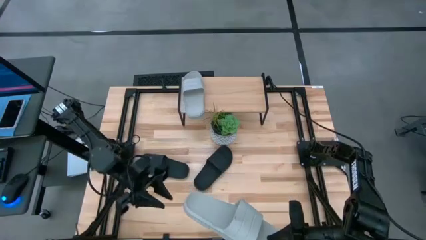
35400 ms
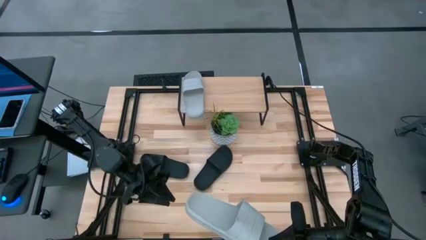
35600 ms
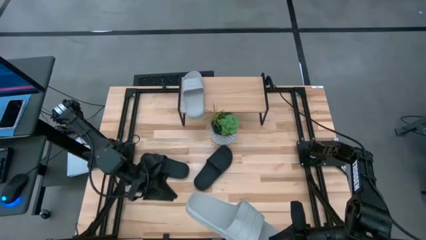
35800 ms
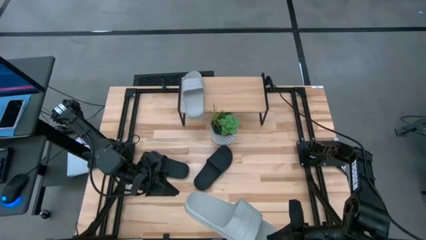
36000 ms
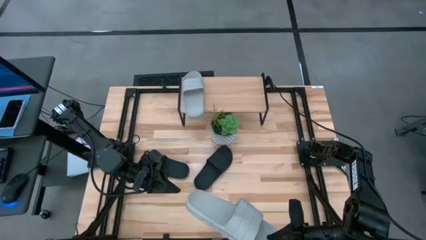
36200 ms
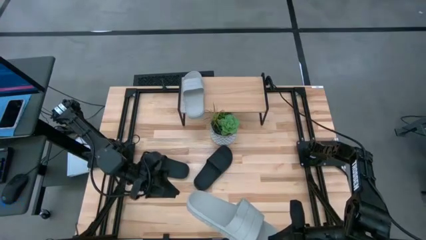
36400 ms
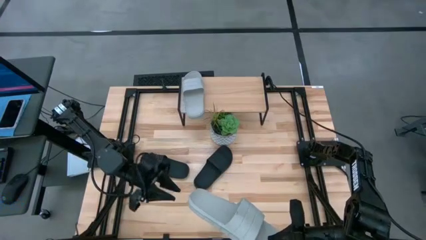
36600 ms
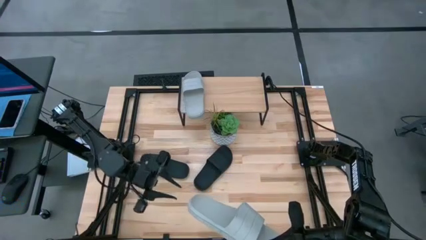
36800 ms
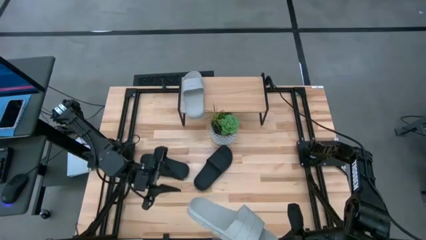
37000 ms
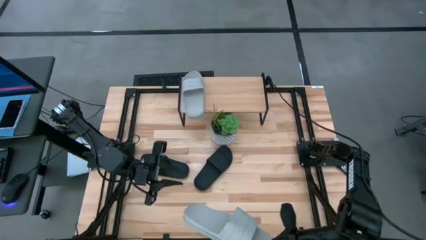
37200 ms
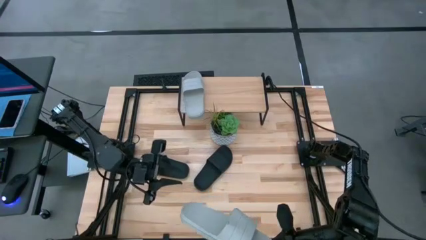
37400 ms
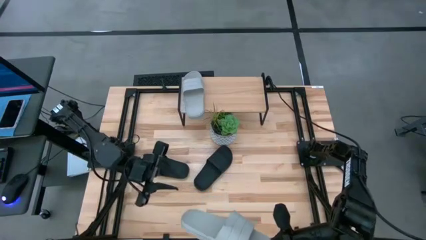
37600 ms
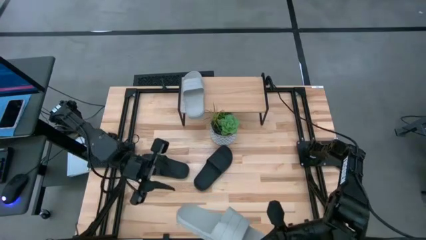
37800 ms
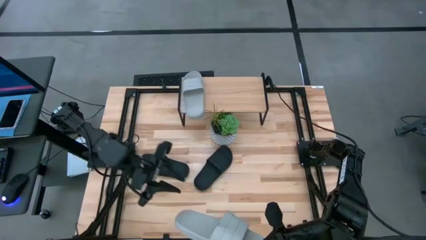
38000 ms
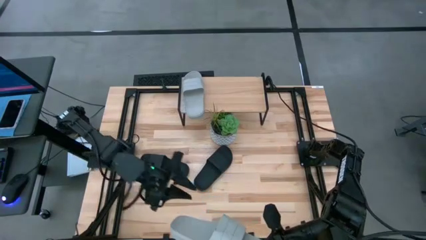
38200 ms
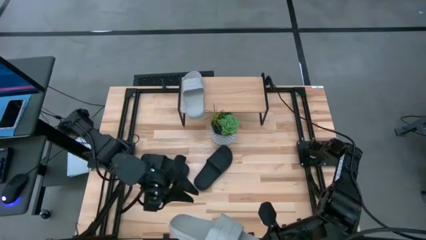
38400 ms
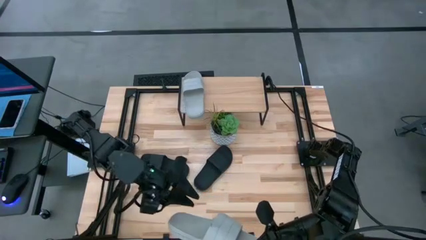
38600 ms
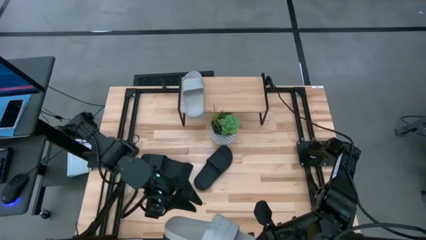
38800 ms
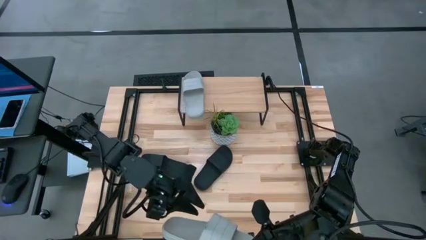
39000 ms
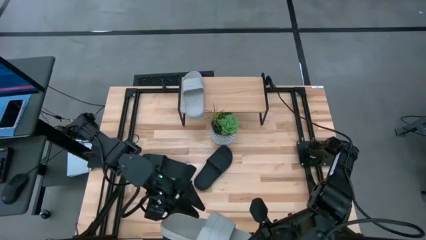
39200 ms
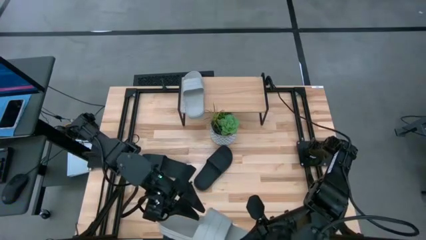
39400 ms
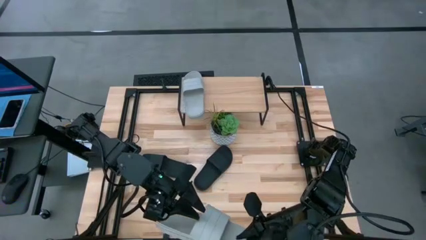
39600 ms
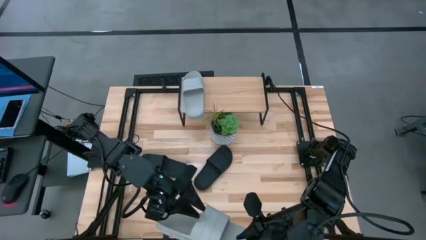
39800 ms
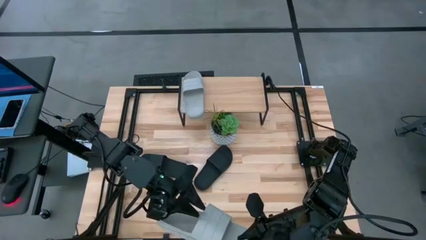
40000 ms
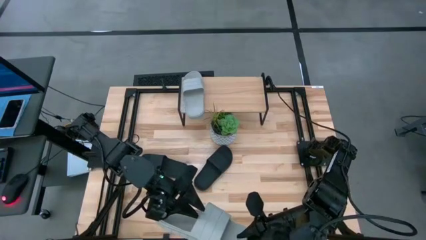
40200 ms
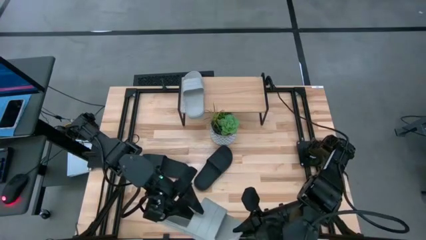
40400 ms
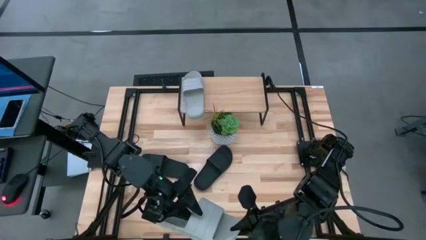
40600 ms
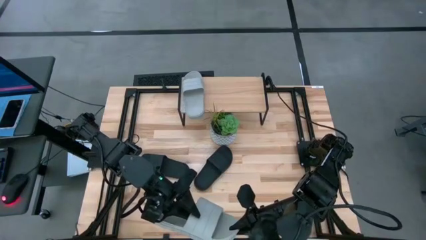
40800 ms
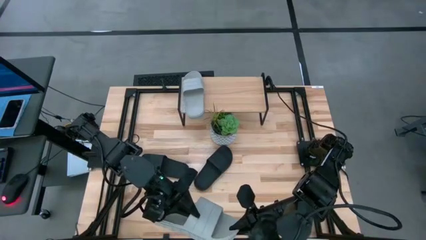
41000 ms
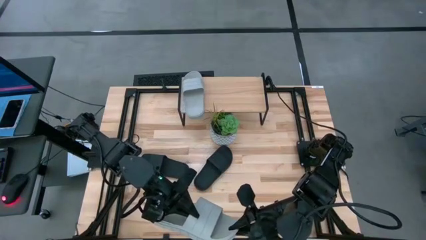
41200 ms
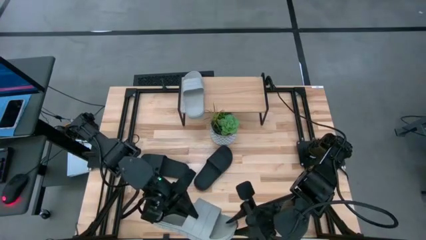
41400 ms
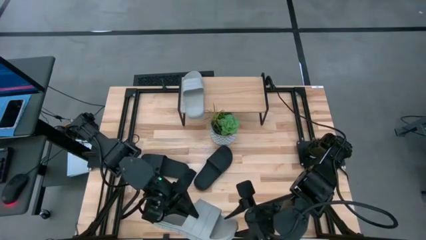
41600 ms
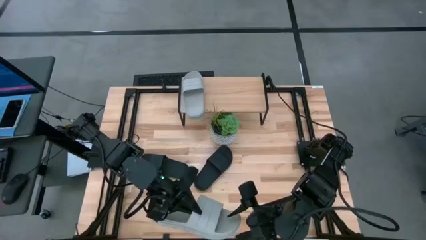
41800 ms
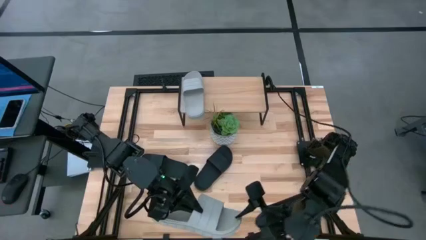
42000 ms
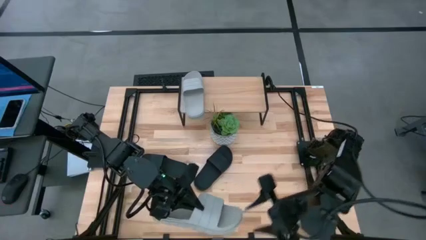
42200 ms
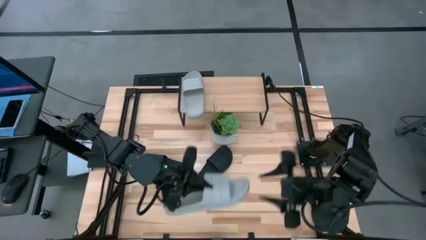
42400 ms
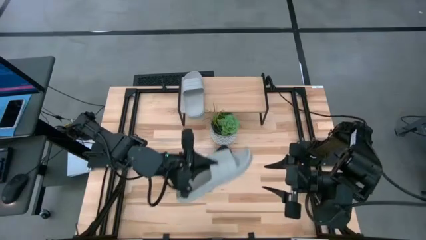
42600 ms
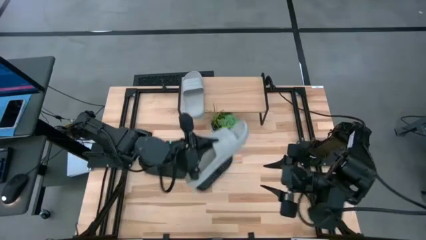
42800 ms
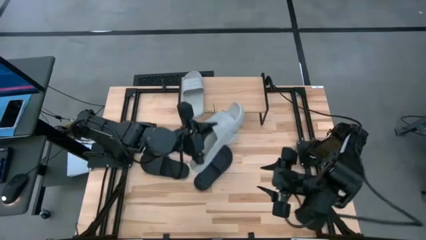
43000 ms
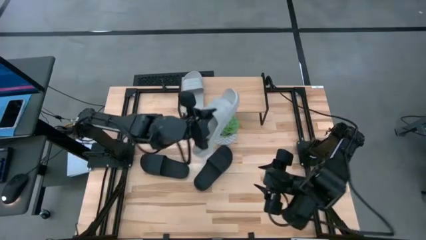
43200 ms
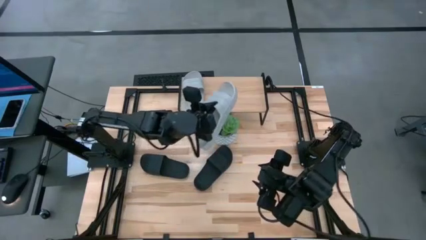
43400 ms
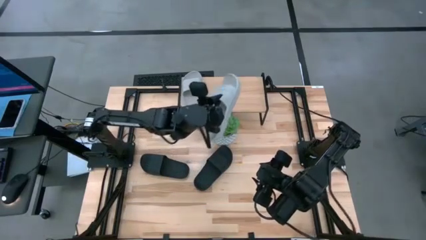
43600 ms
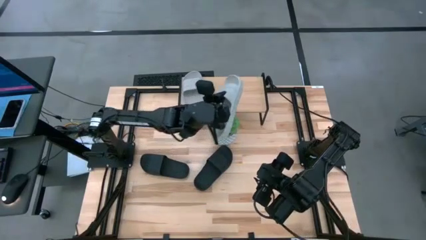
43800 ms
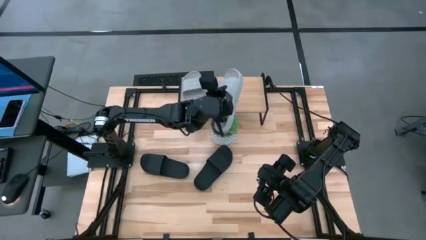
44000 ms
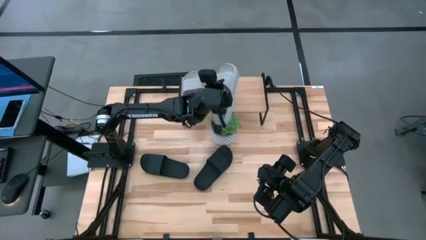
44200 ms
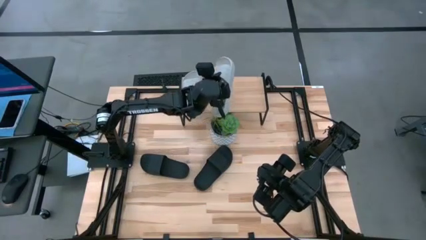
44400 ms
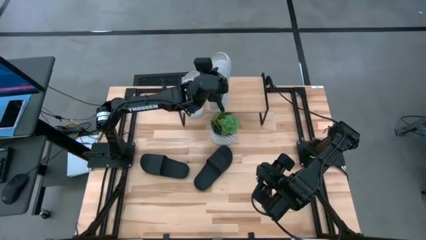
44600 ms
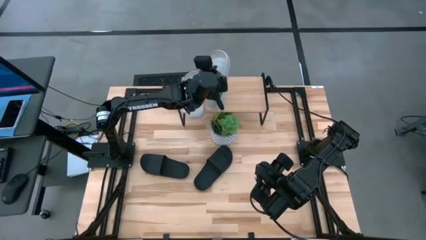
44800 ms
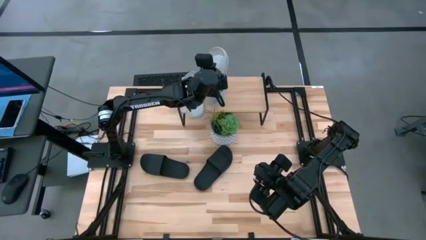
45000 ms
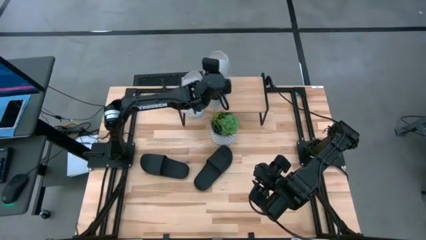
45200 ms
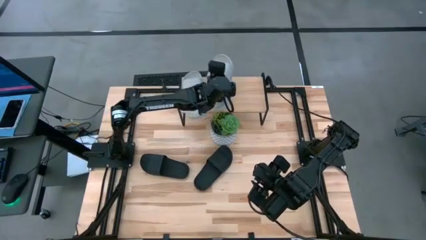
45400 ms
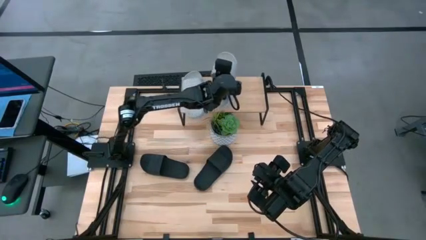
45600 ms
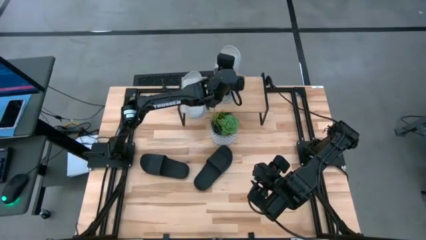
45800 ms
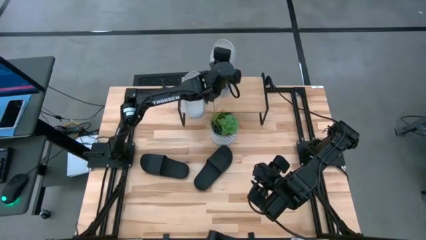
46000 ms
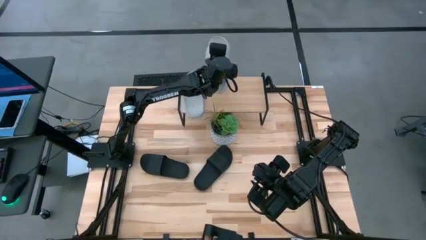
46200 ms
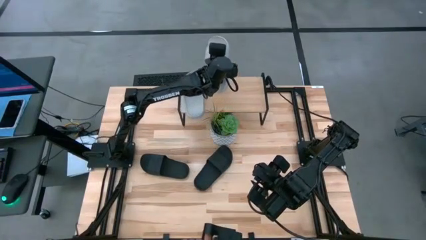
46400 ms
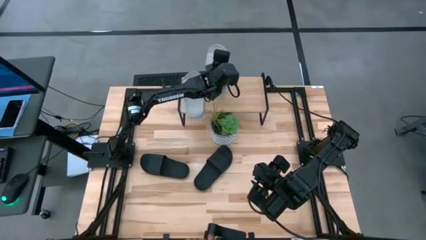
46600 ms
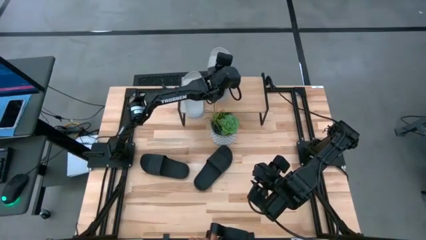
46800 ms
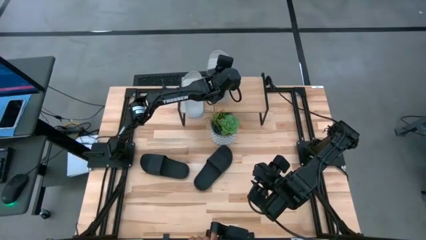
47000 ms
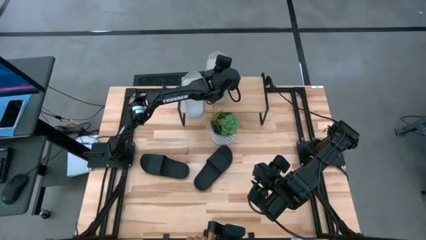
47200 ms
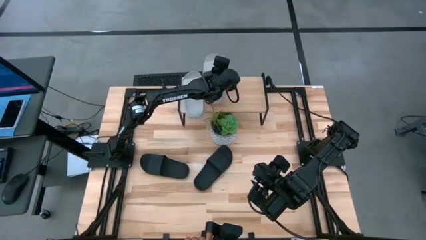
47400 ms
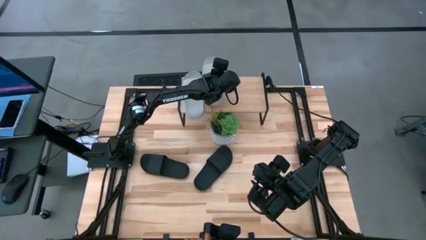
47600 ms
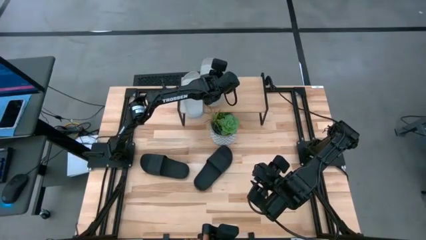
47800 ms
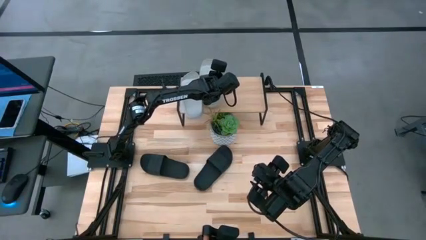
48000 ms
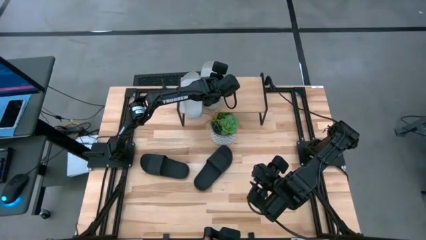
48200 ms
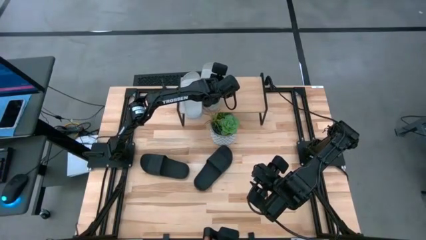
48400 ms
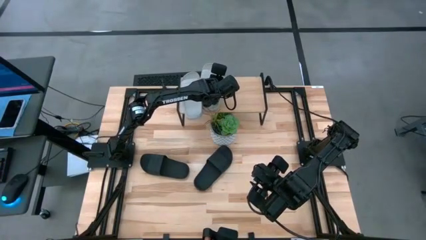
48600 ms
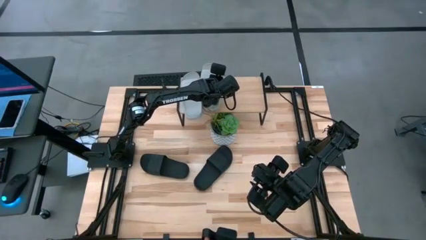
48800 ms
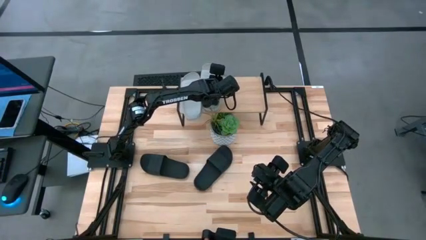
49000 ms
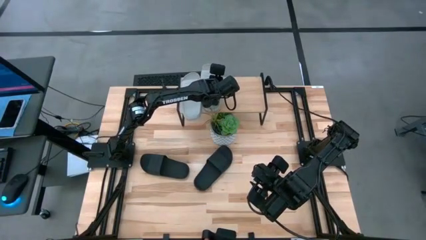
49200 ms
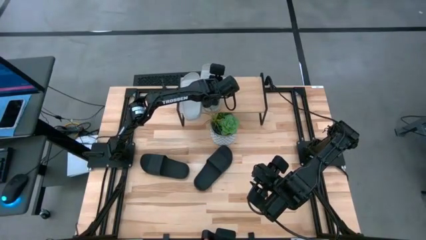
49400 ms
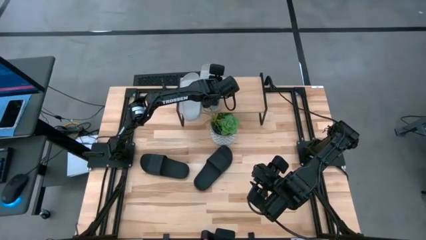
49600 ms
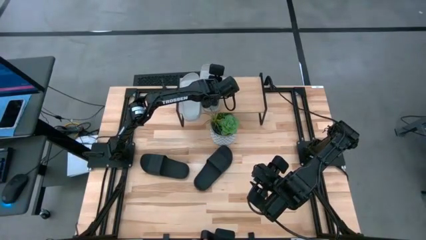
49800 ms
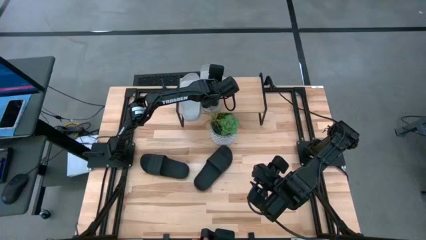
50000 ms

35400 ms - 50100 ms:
Task: Pick and place slides into the shelf
Put the gray slide on the shelf
